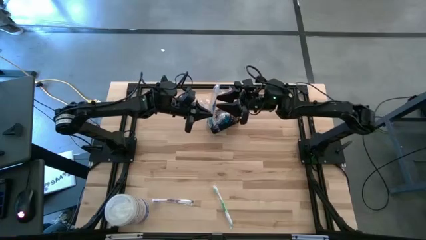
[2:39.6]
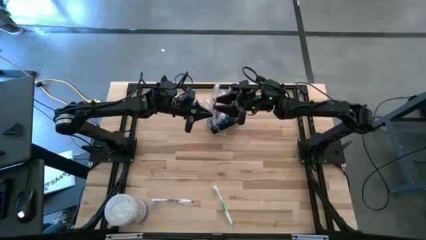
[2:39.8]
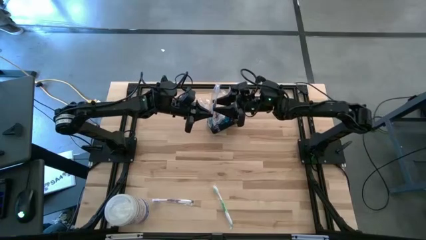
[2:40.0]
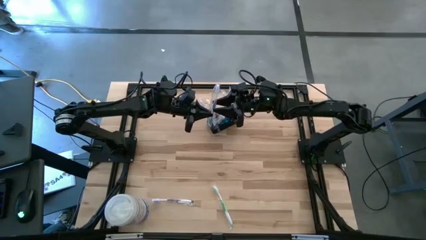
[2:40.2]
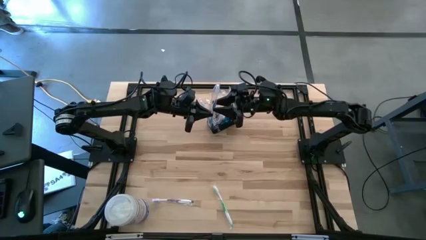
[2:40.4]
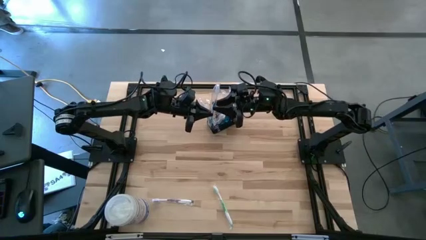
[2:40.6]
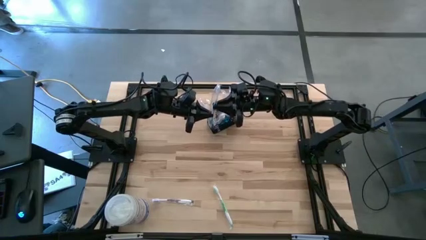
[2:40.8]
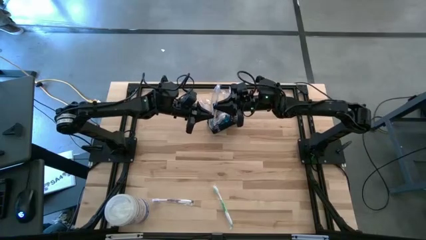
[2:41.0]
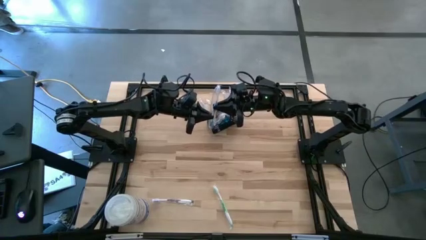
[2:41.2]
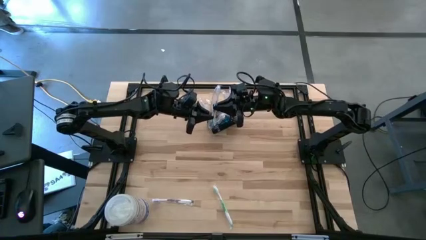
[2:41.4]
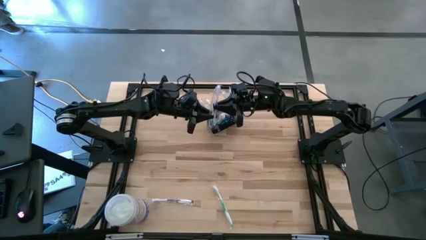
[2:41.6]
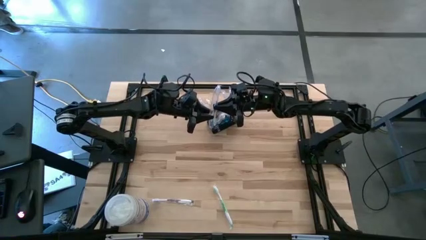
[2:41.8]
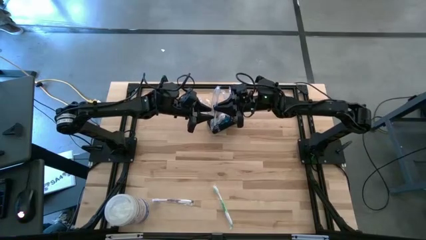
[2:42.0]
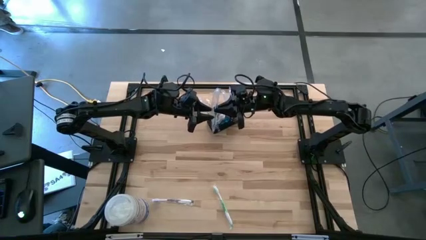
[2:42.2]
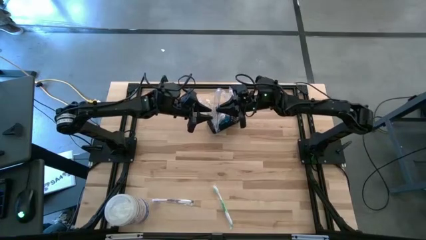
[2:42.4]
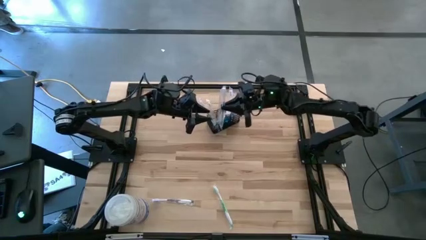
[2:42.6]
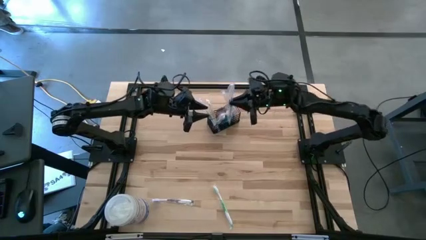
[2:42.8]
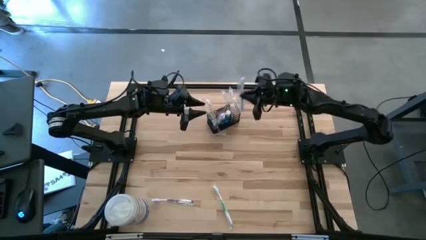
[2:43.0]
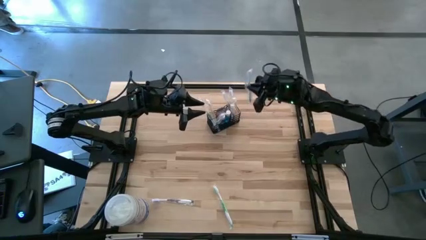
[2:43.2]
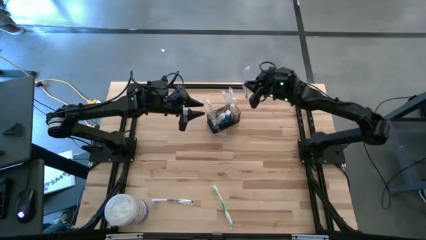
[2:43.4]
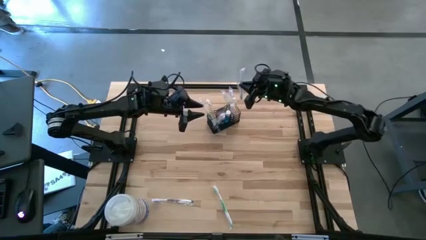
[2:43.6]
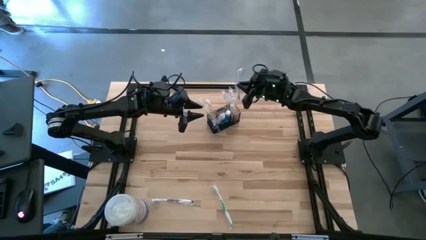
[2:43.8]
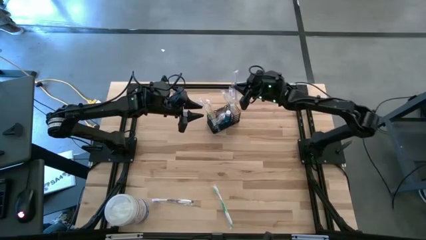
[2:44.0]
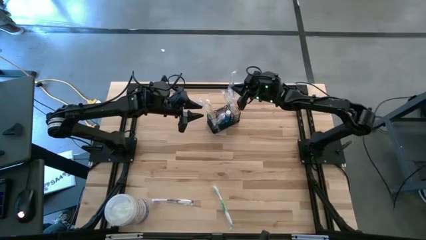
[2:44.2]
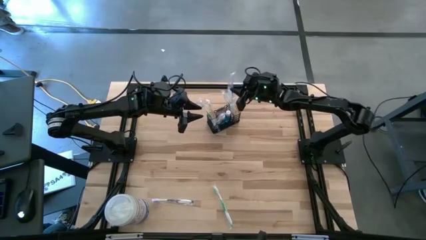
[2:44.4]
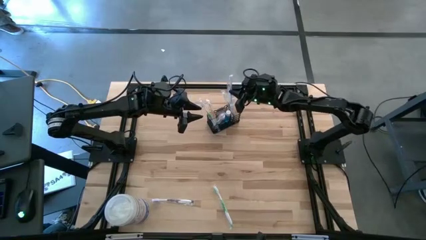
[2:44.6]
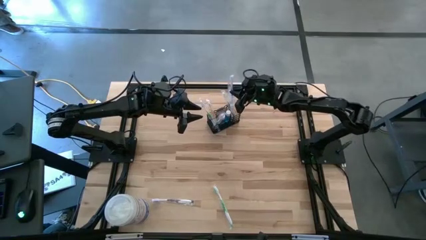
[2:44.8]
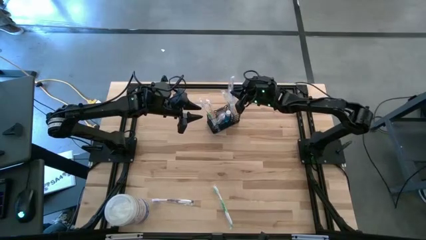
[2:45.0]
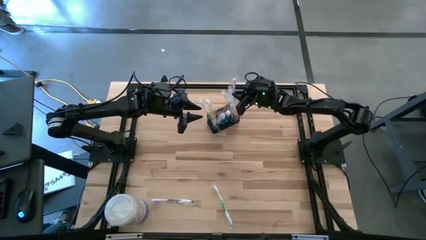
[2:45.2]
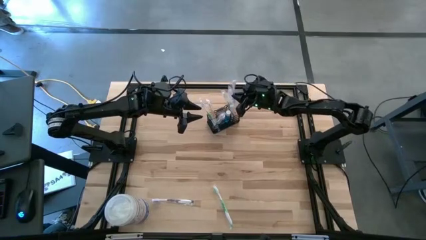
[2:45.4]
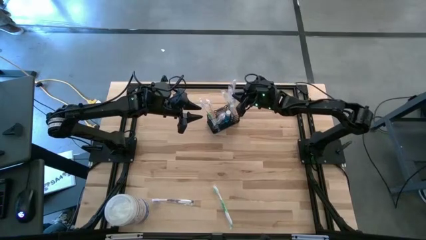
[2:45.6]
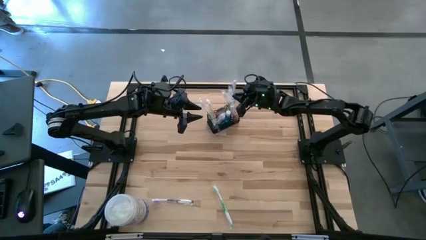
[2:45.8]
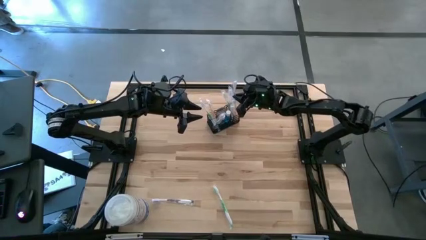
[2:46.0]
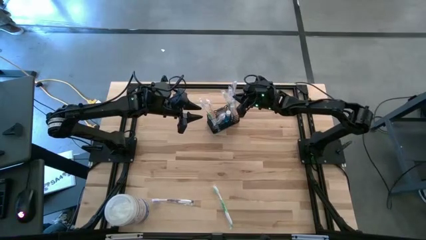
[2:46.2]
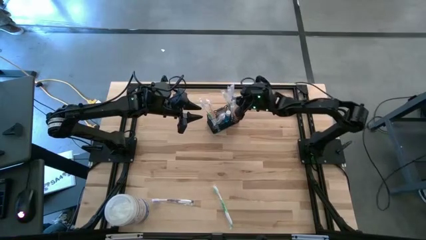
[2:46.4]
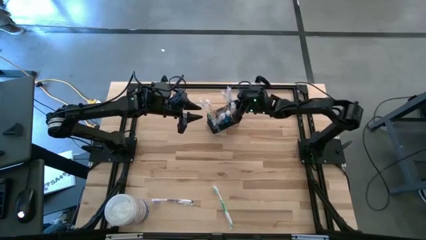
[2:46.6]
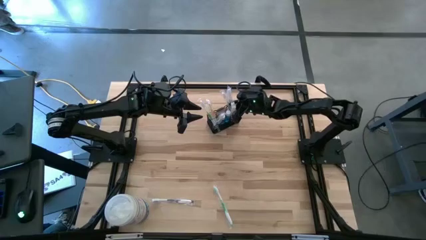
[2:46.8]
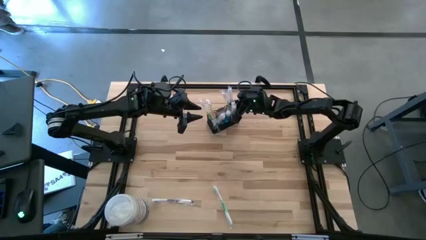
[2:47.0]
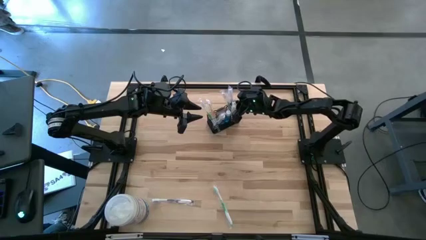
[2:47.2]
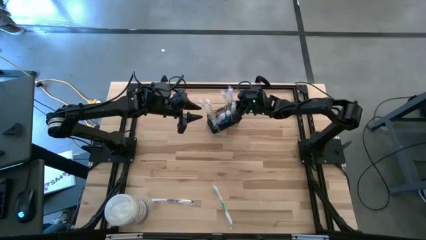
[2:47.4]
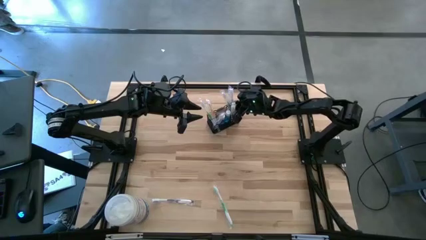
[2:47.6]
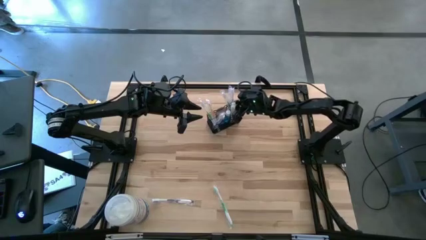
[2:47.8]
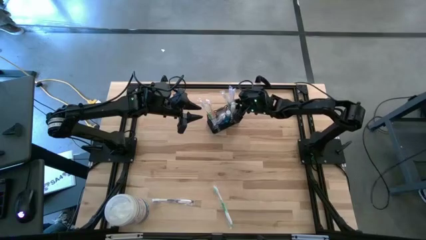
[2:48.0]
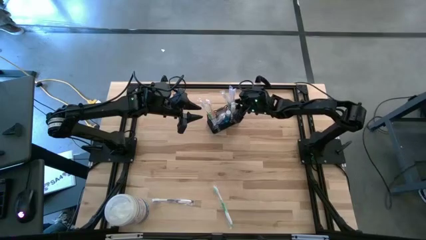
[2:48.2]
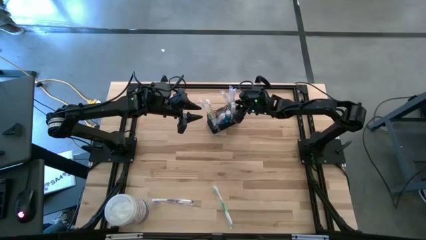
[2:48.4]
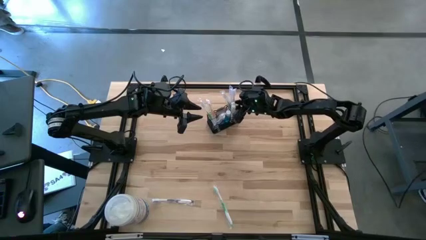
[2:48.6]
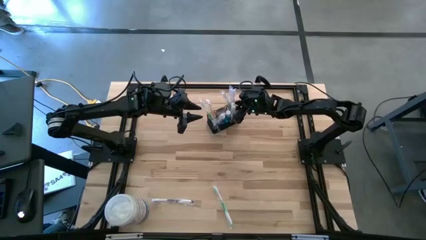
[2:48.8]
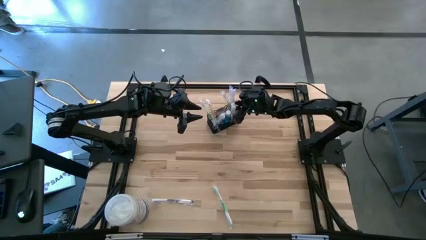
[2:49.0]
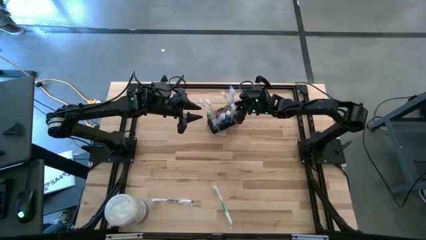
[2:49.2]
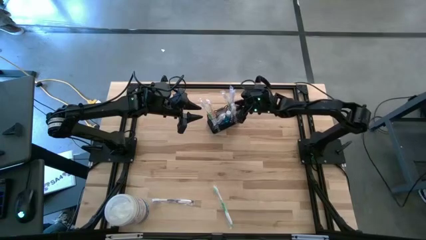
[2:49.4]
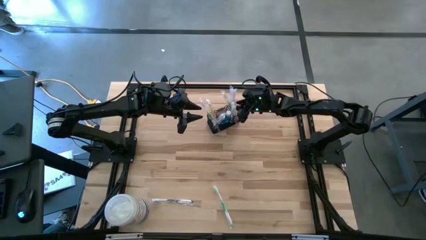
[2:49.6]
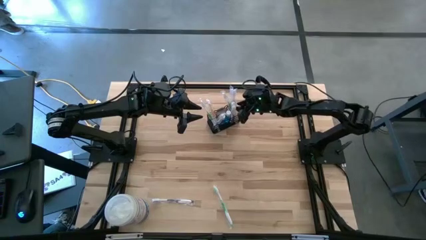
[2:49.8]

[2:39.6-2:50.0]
Task: Pick & Place toothbrushing station
Put the blue toothbrush into the mesh organizer

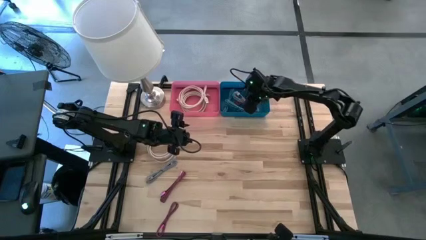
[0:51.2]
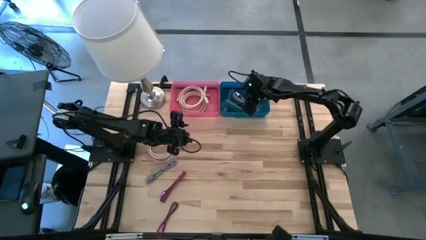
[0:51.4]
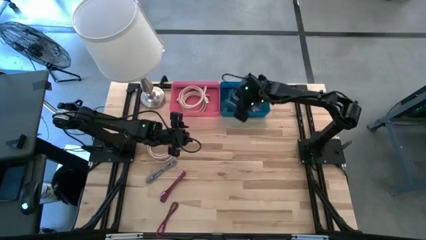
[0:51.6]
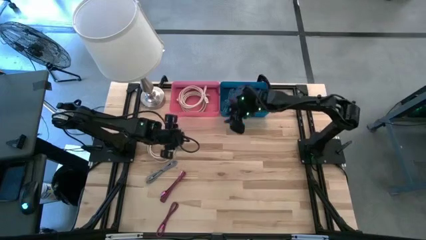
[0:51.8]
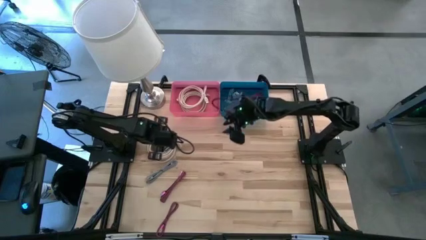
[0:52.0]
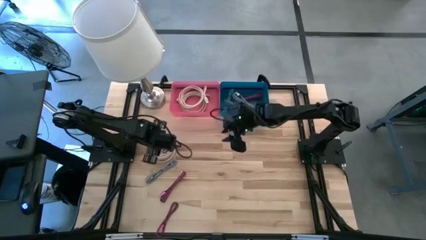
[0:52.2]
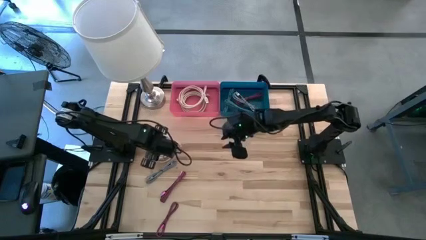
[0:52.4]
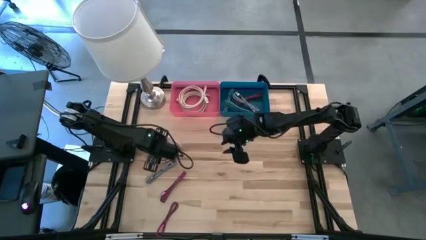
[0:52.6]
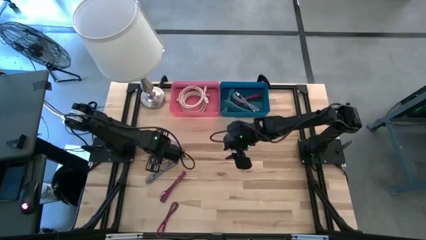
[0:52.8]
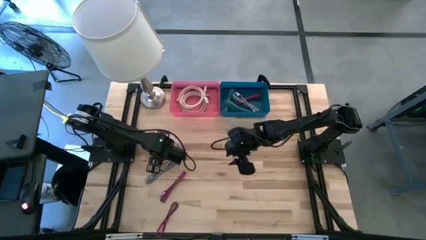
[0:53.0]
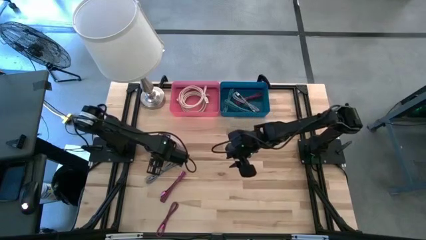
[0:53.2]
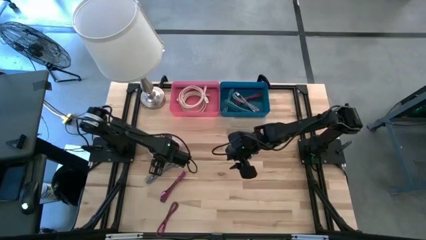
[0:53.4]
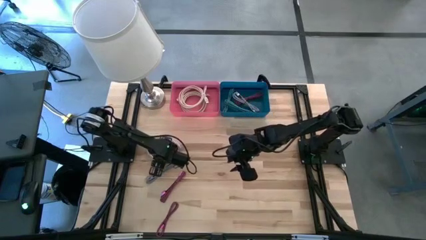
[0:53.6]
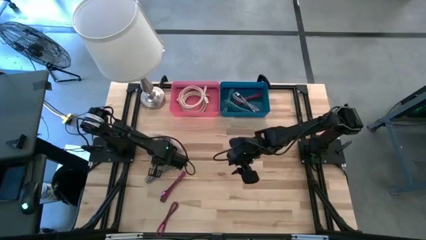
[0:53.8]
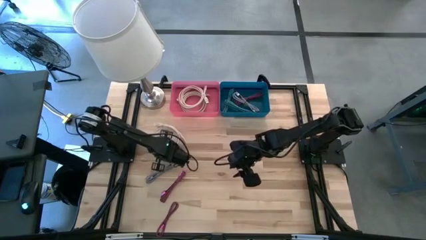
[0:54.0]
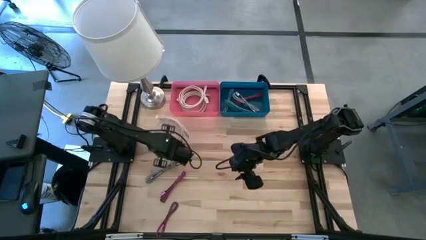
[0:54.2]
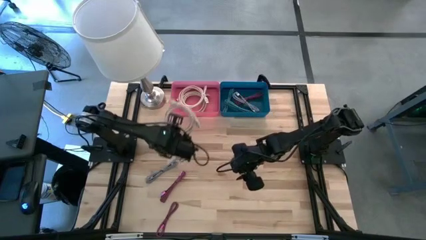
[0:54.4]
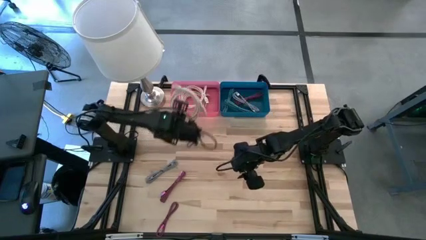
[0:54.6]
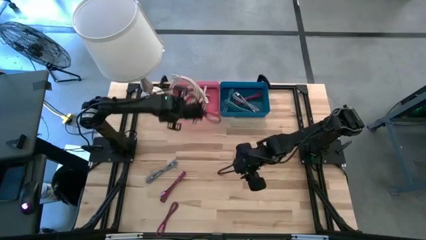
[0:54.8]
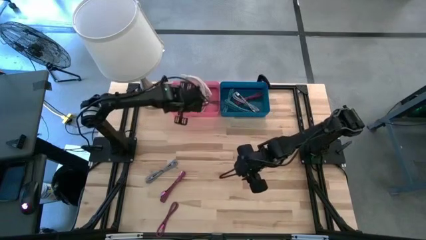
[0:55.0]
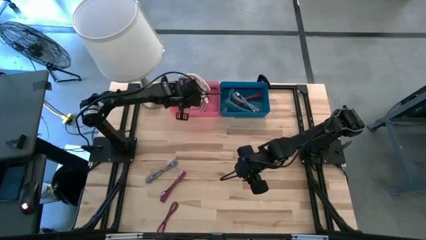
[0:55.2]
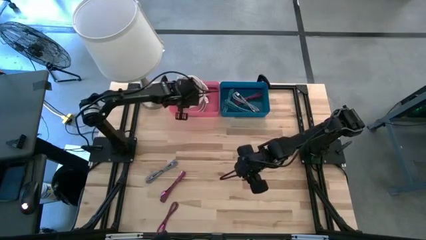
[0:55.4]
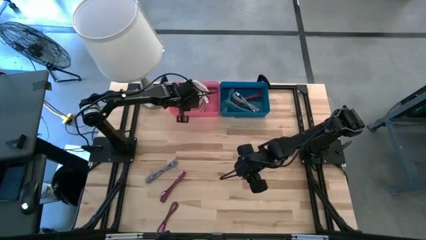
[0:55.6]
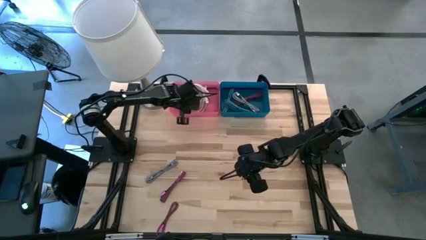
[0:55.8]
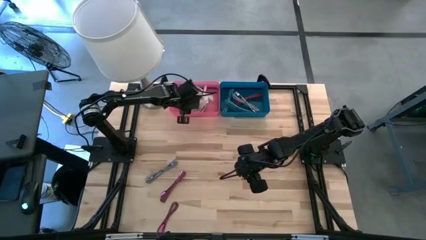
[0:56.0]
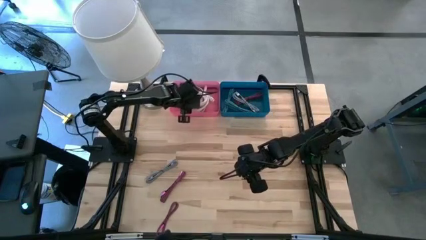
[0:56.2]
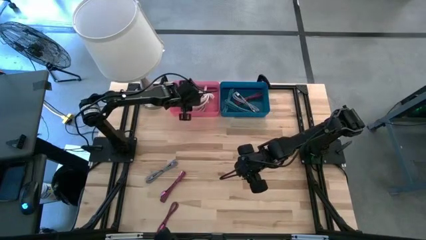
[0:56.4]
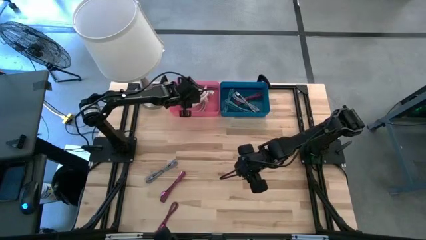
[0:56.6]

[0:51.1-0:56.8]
Task: Pick & Place USB Port
Put the large white charger cable into the red bin
